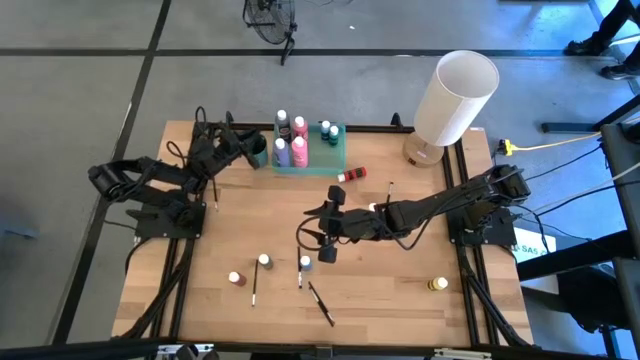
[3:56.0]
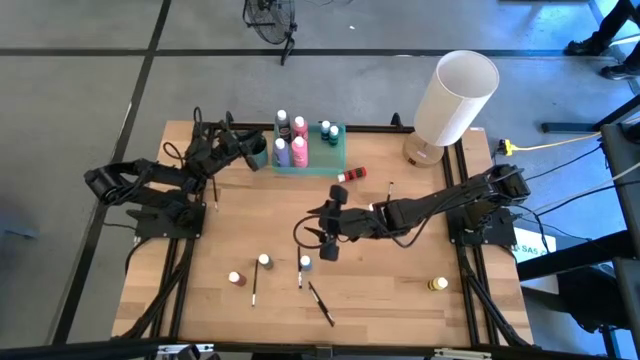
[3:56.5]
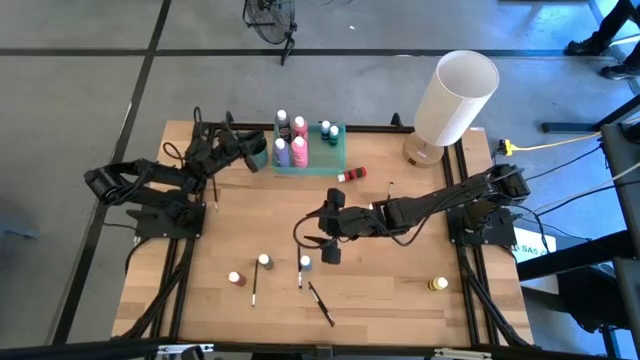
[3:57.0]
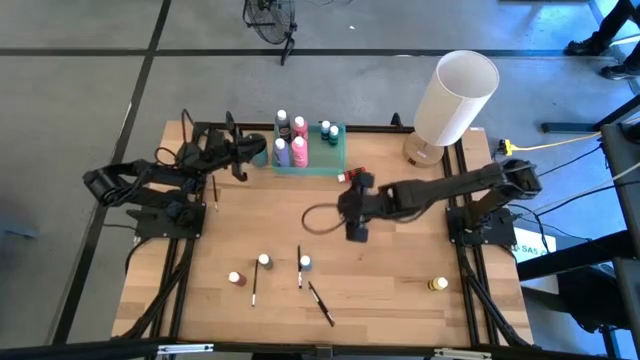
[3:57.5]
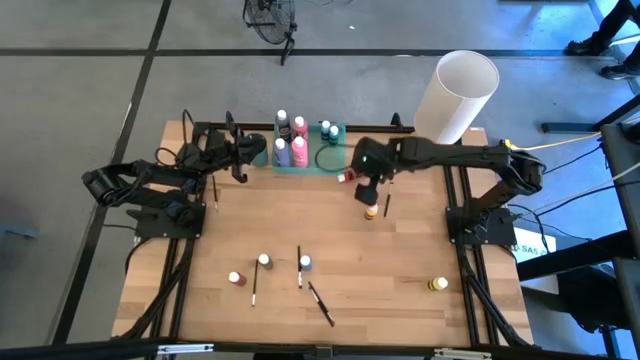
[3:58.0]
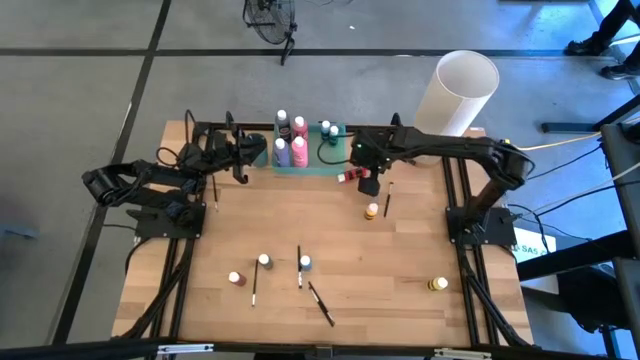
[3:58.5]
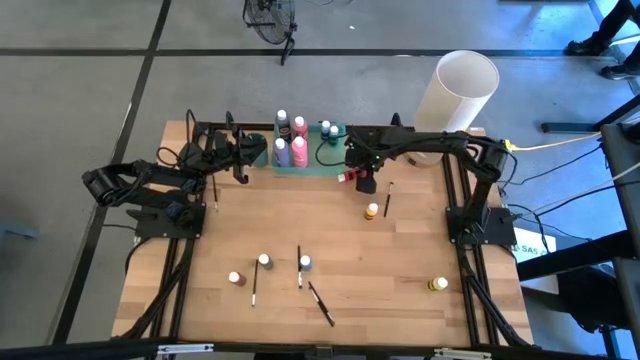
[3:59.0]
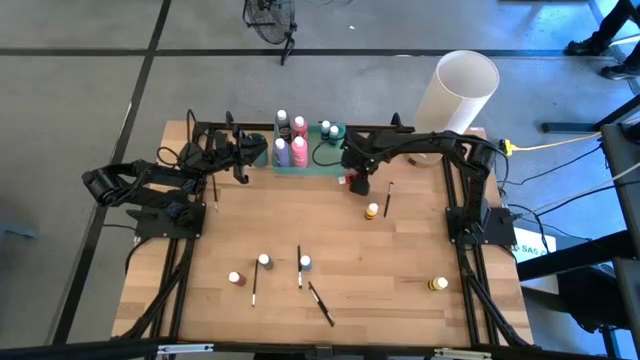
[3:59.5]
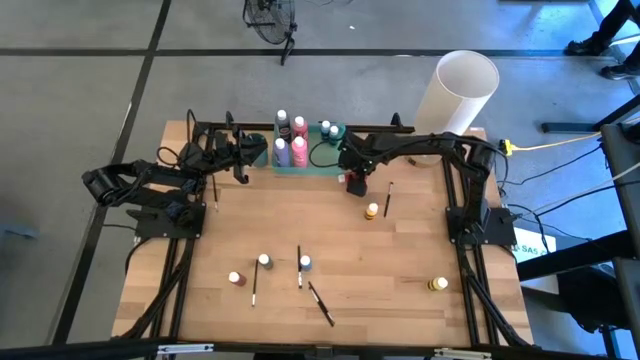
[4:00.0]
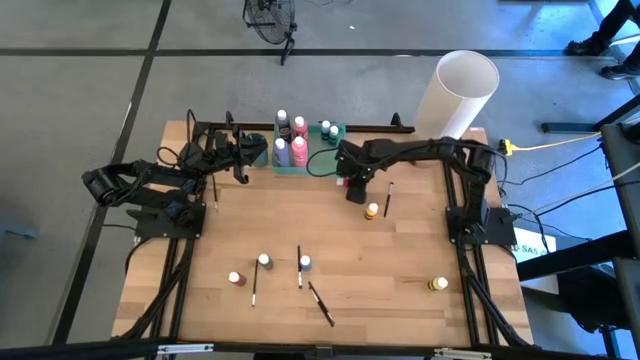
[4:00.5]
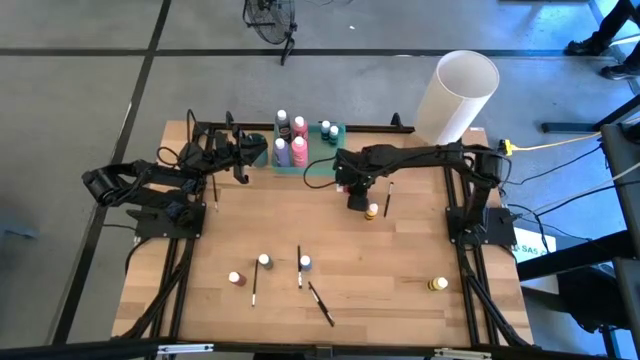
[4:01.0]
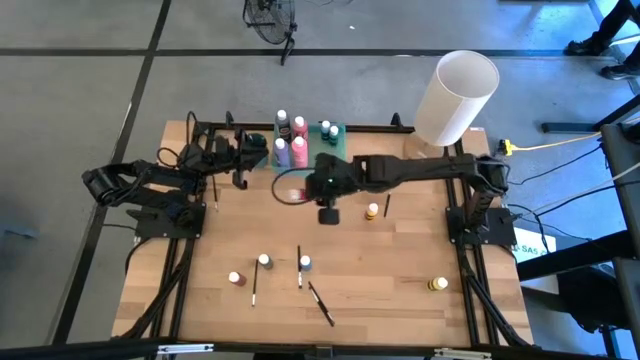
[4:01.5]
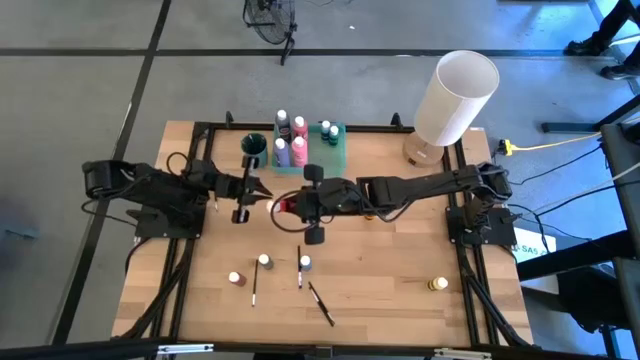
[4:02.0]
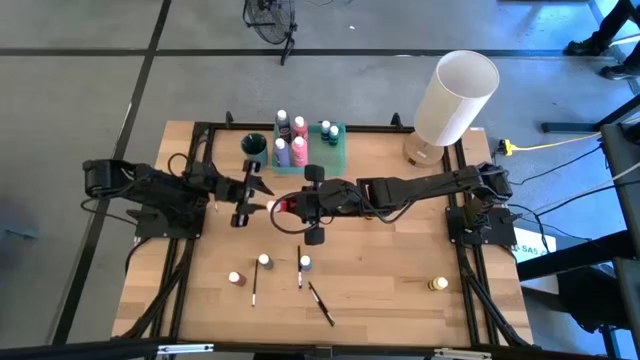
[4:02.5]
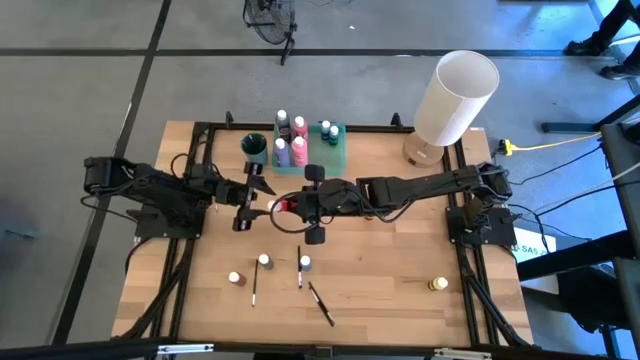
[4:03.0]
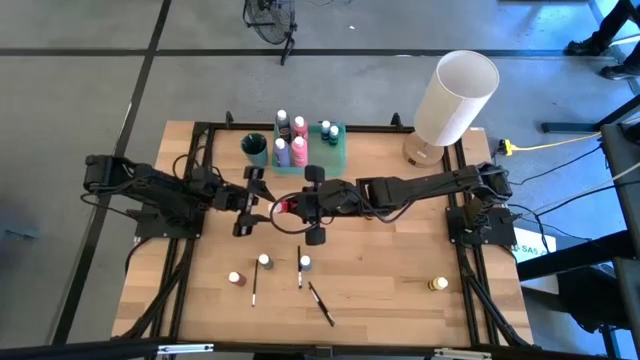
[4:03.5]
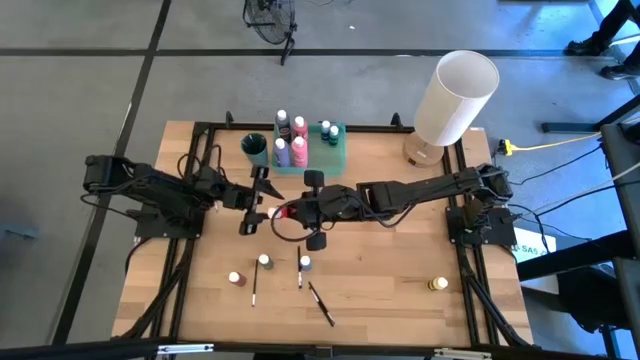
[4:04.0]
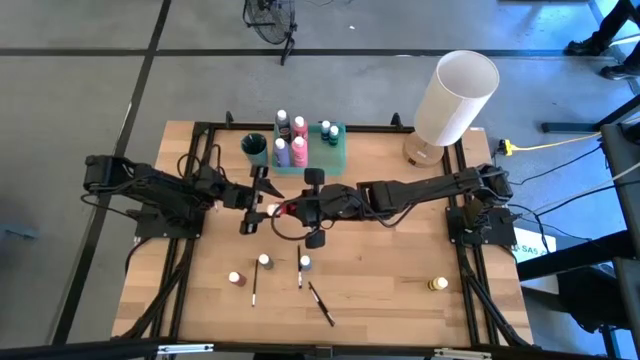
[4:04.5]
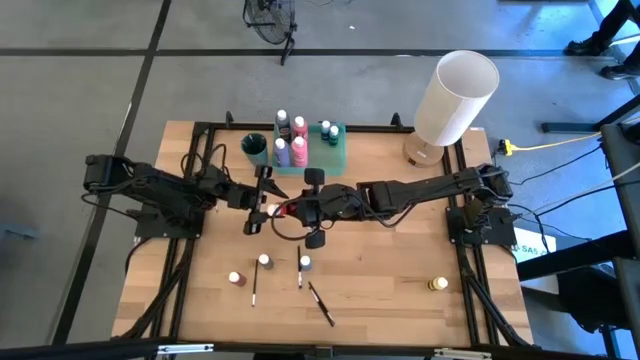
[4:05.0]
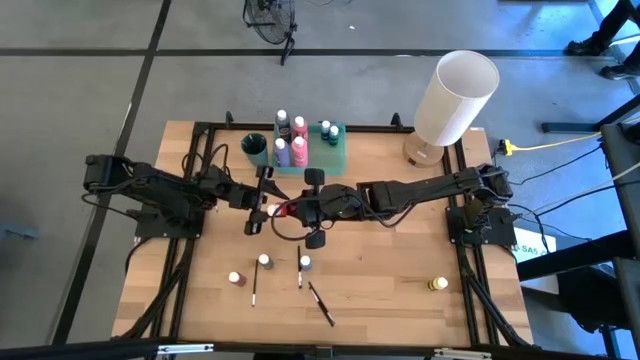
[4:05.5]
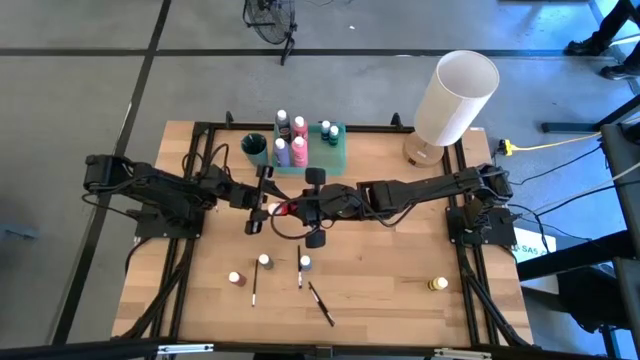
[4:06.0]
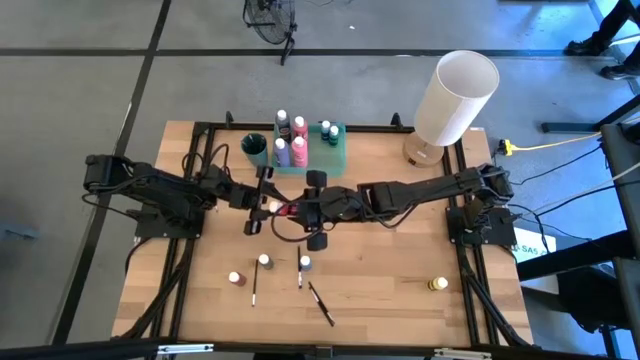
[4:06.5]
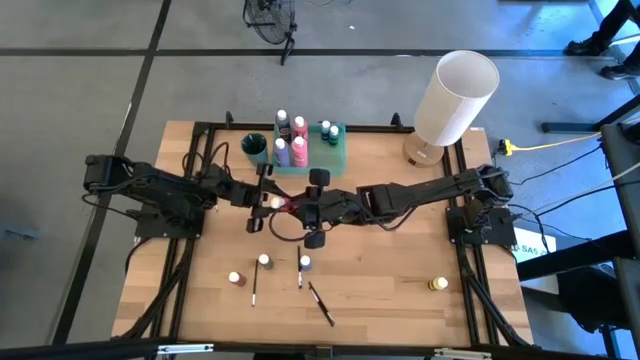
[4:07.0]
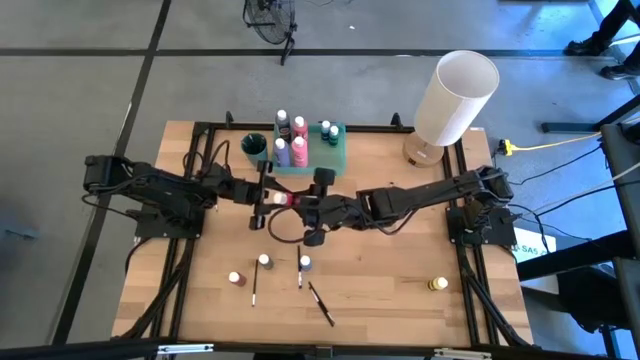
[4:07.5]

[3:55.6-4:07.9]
Task: Pick & Place Paint Supplies
Put the top small red paint bottle into the green bin

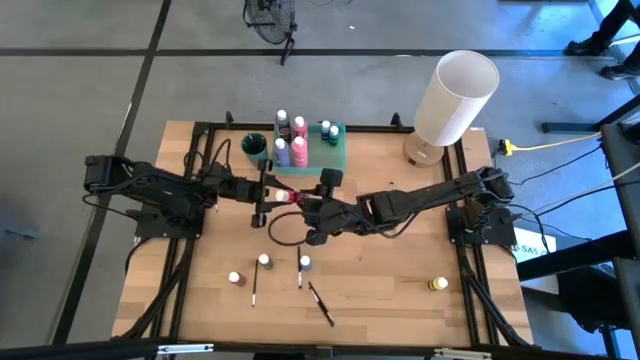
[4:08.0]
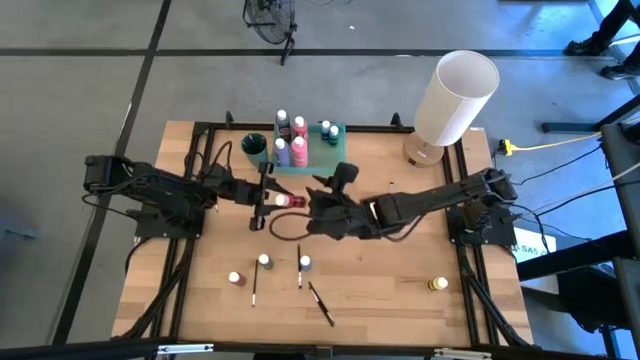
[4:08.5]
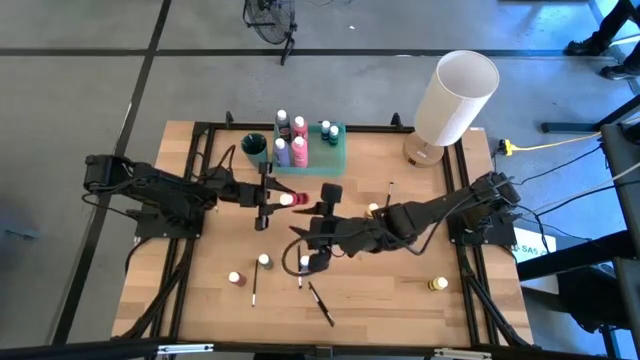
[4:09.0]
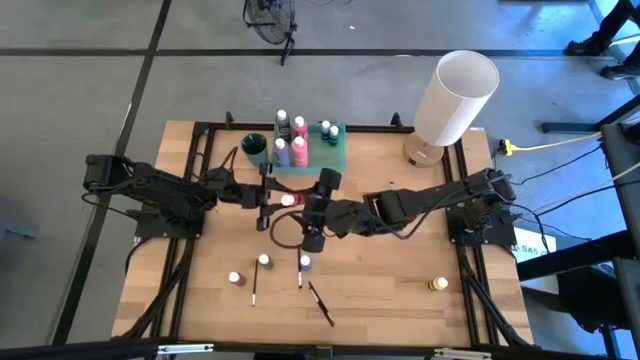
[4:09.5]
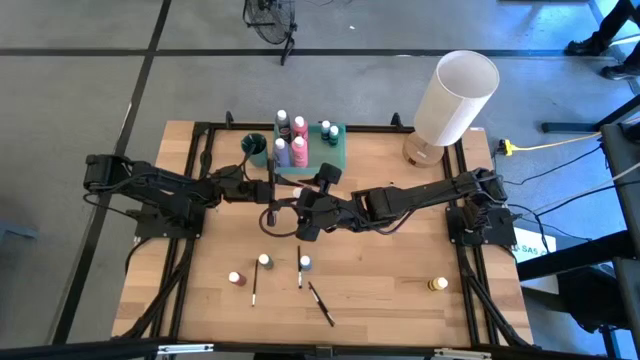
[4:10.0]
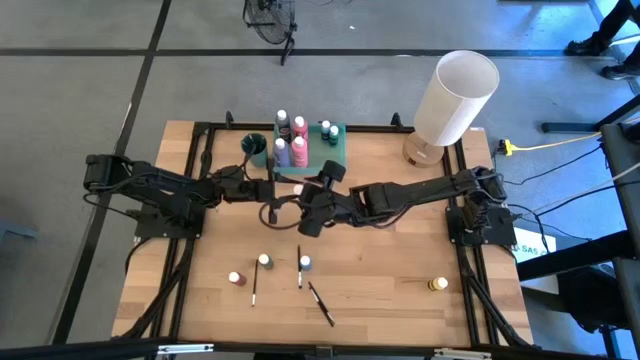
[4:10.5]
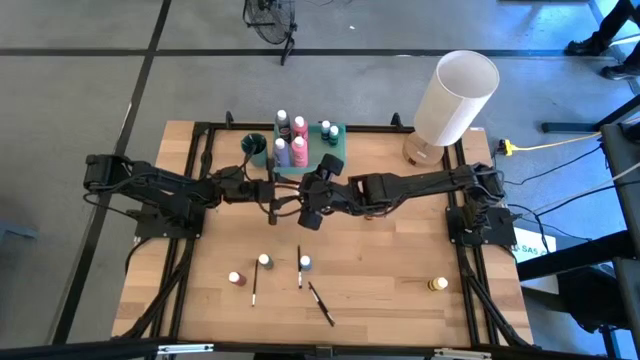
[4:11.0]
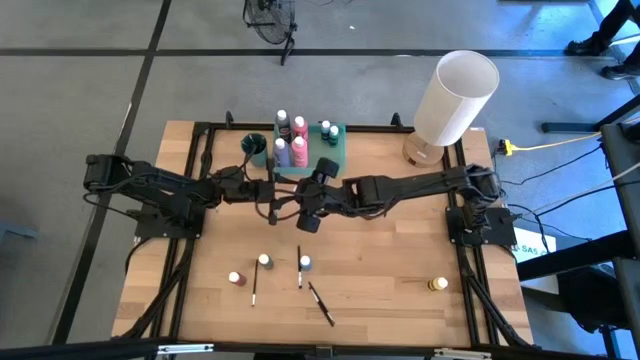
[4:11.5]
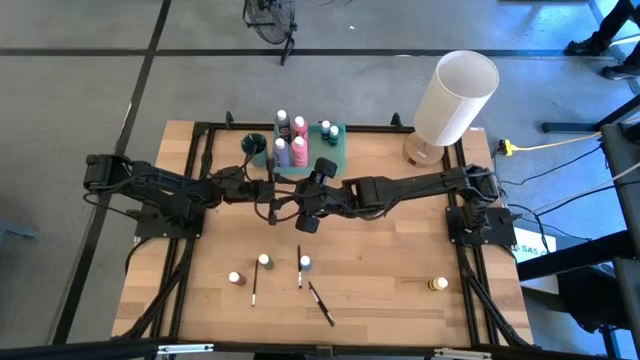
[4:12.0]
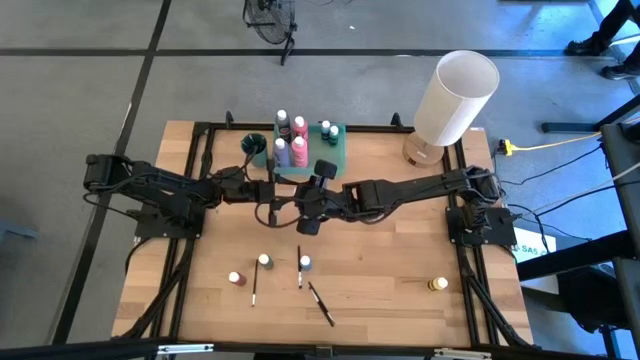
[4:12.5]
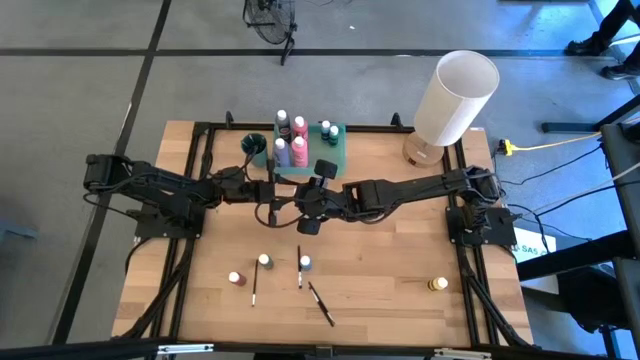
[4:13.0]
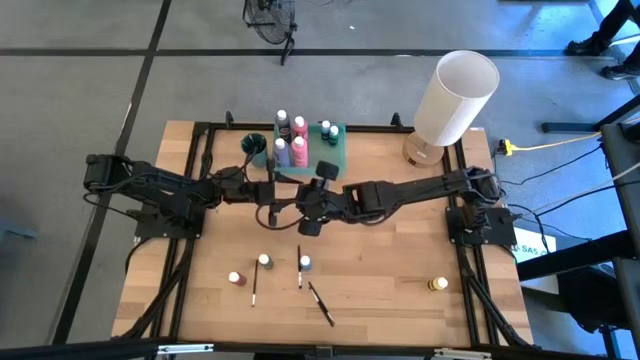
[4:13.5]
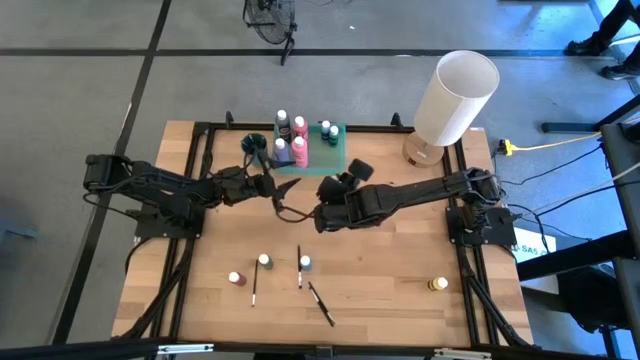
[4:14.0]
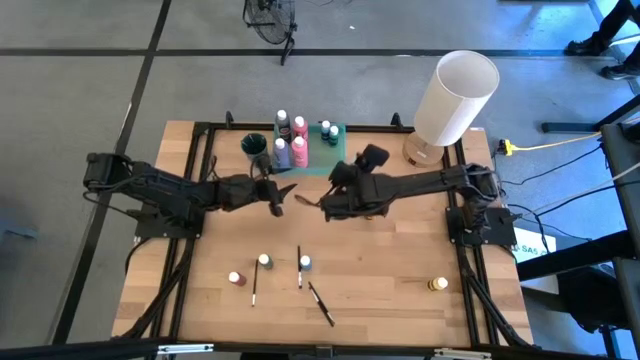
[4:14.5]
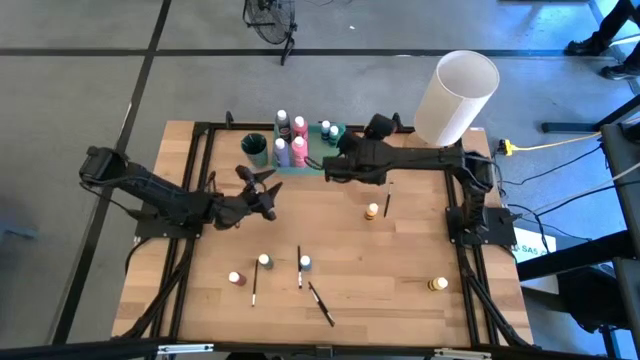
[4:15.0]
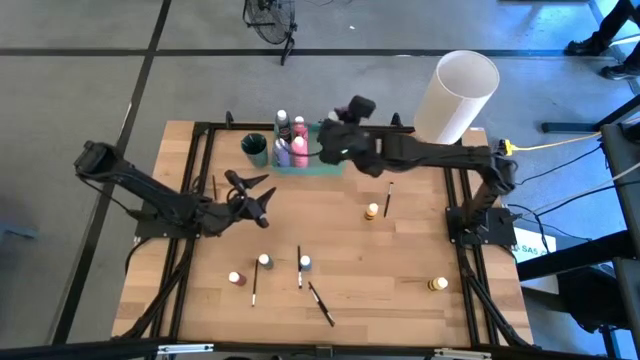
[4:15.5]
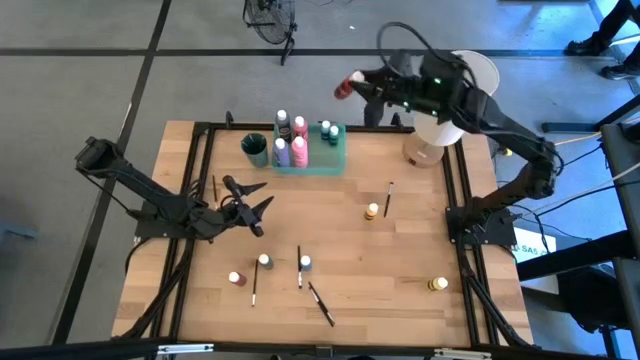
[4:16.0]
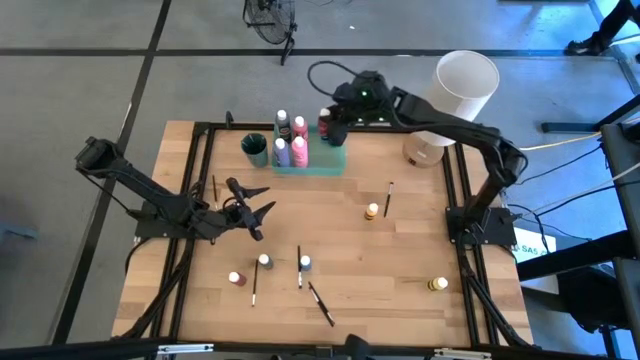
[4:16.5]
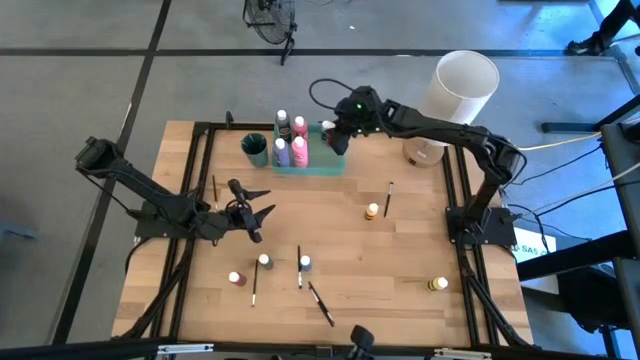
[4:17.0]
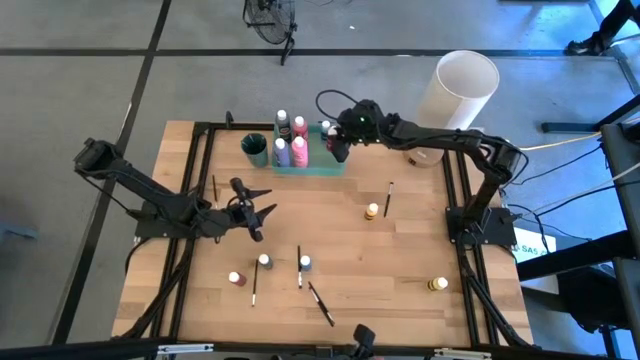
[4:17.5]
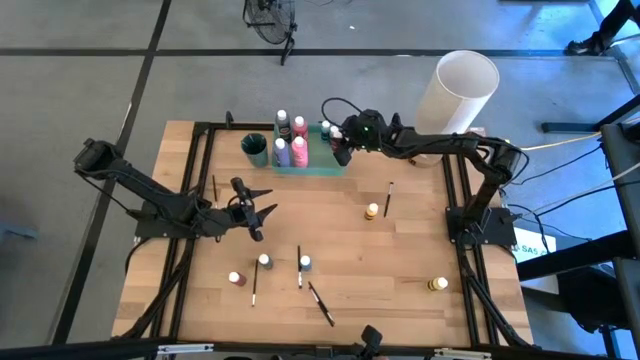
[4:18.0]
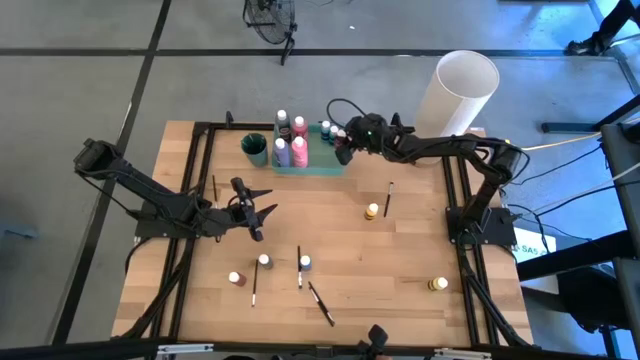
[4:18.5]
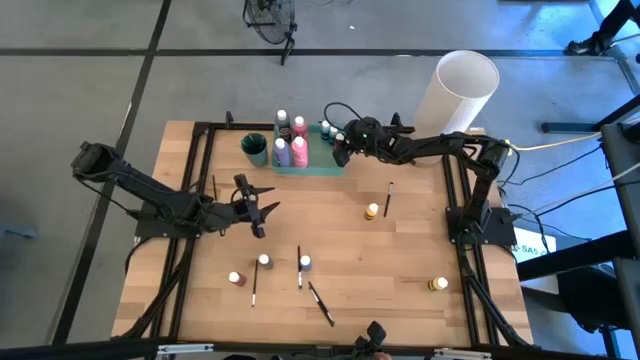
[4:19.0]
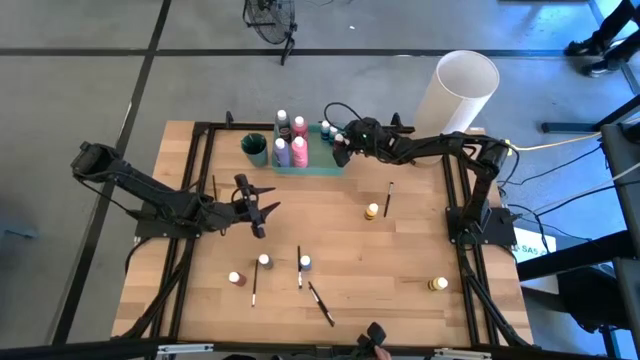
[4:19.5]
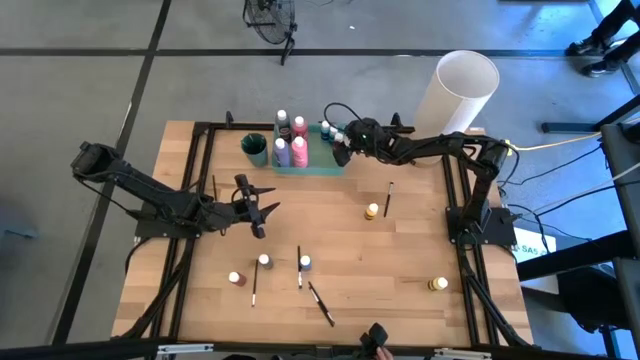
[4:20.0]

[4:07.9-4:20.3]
Put the top small red paint bottle into the green bin
